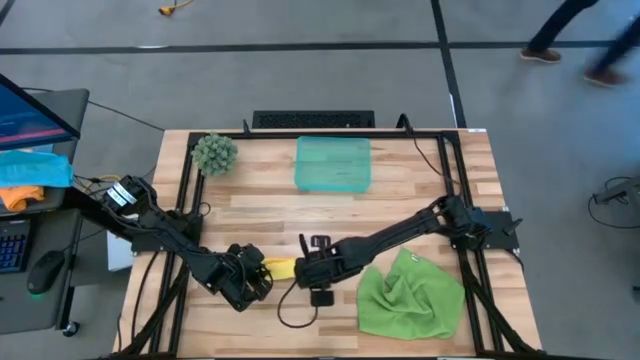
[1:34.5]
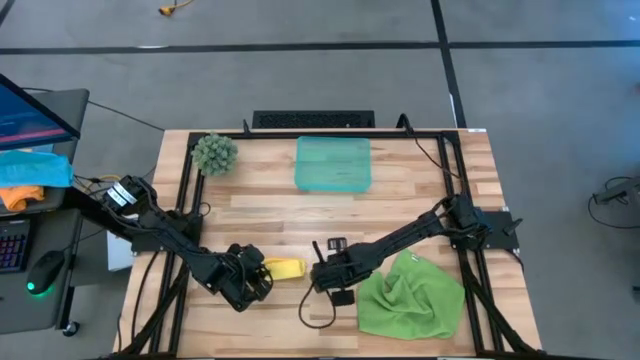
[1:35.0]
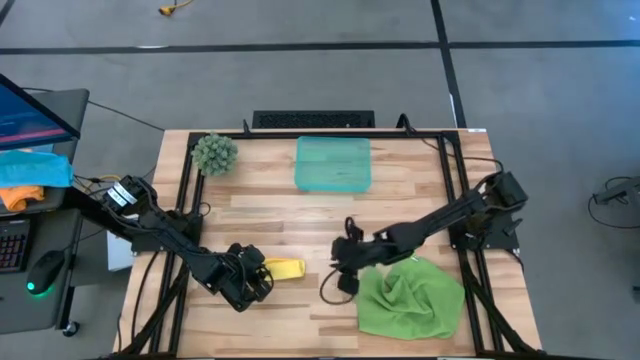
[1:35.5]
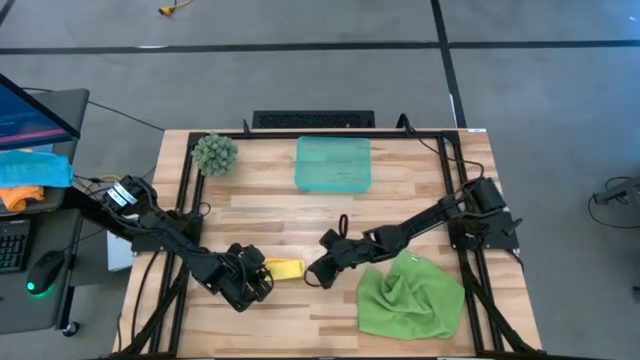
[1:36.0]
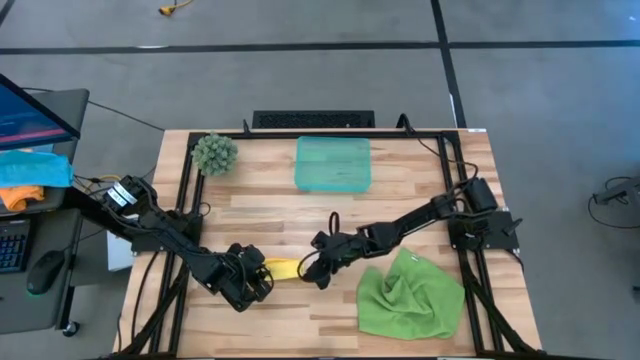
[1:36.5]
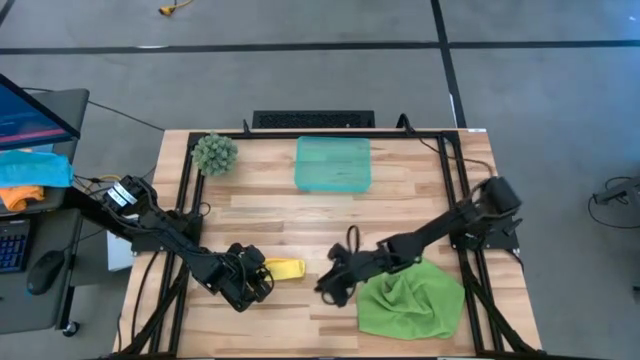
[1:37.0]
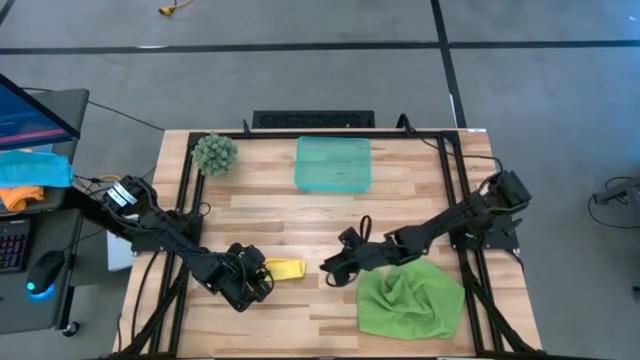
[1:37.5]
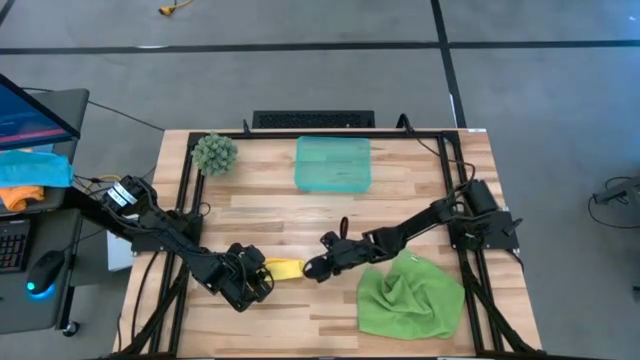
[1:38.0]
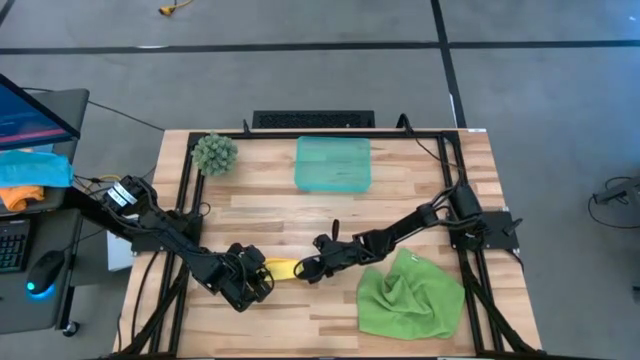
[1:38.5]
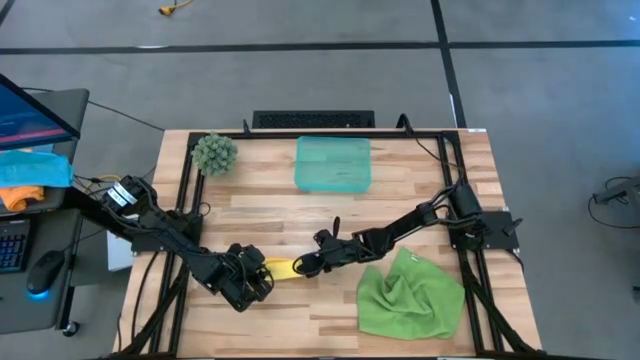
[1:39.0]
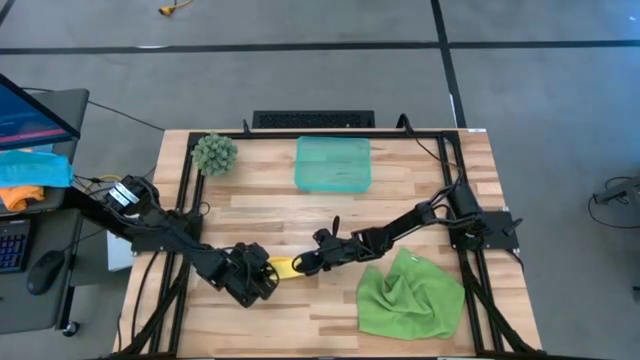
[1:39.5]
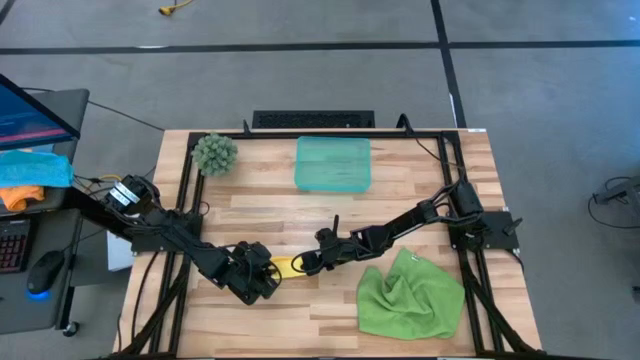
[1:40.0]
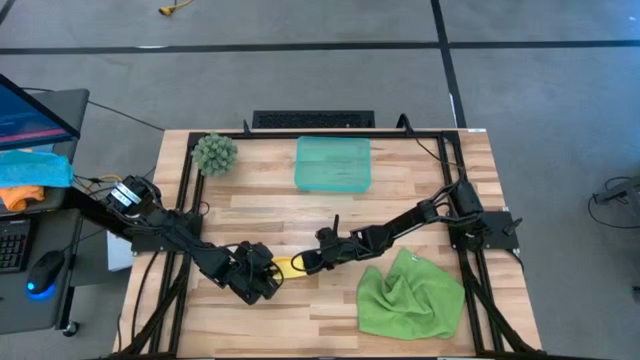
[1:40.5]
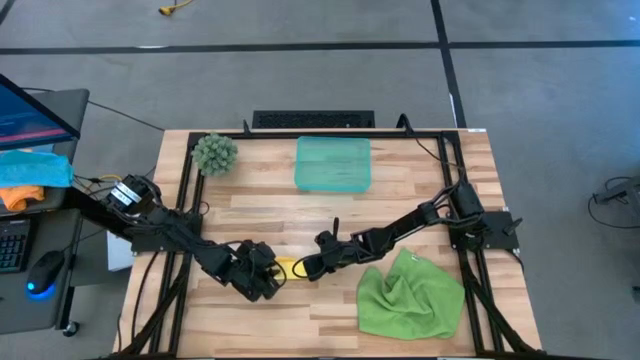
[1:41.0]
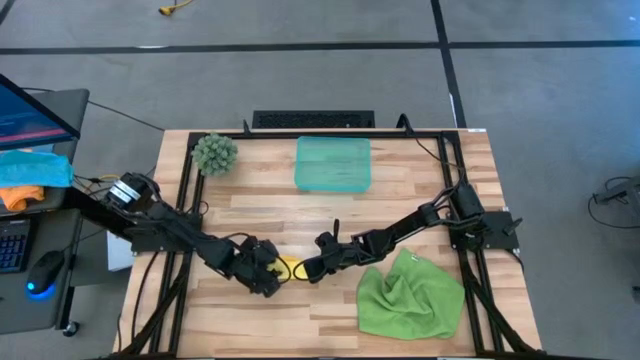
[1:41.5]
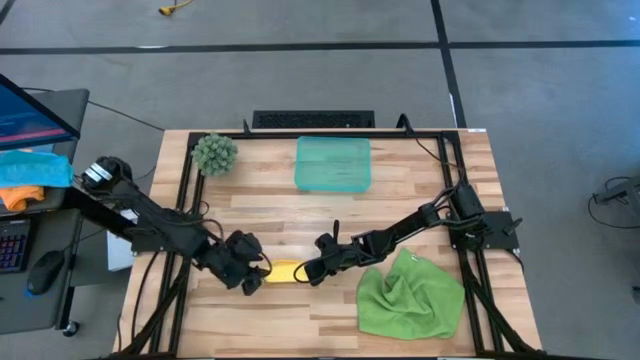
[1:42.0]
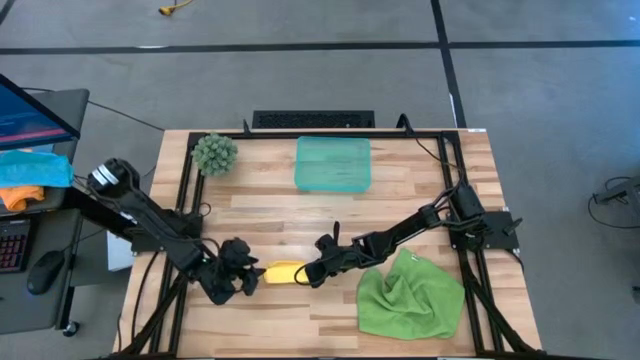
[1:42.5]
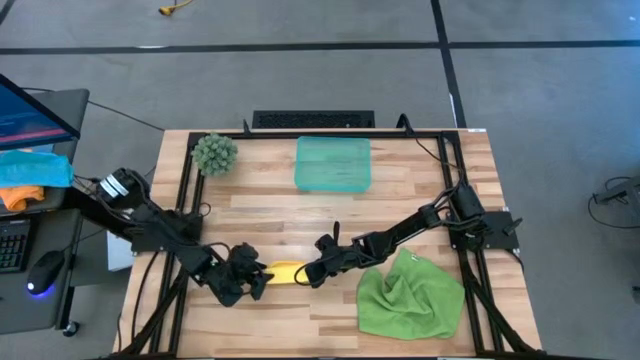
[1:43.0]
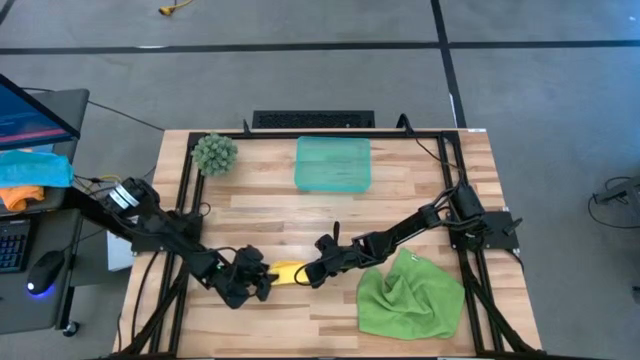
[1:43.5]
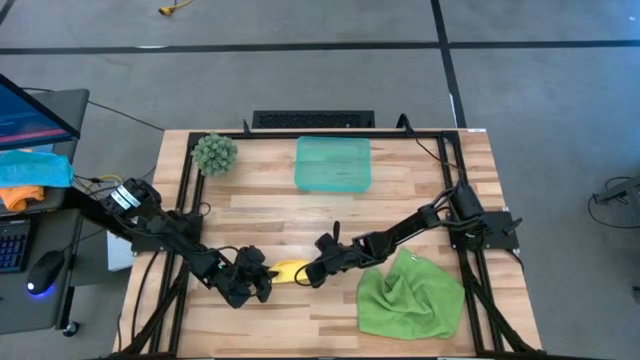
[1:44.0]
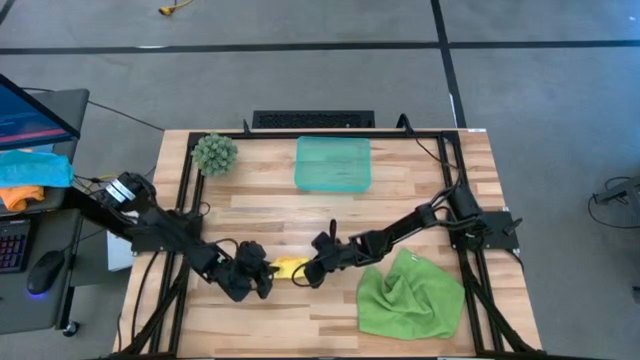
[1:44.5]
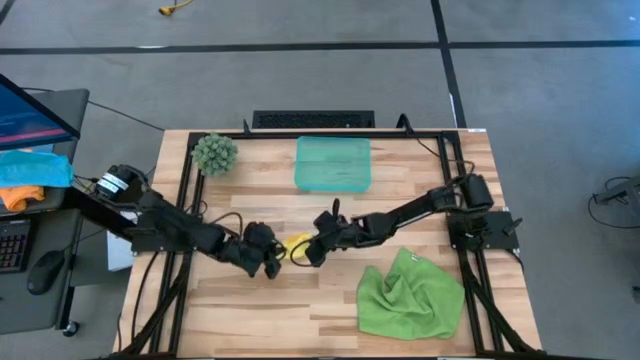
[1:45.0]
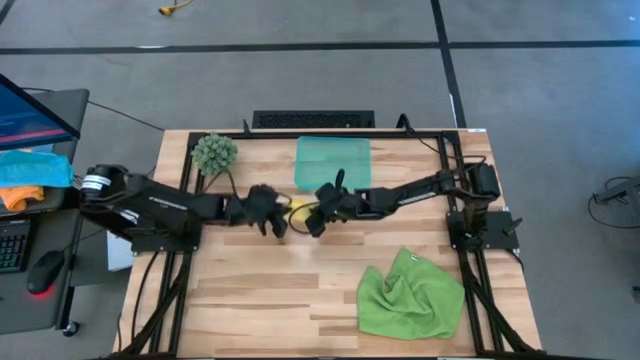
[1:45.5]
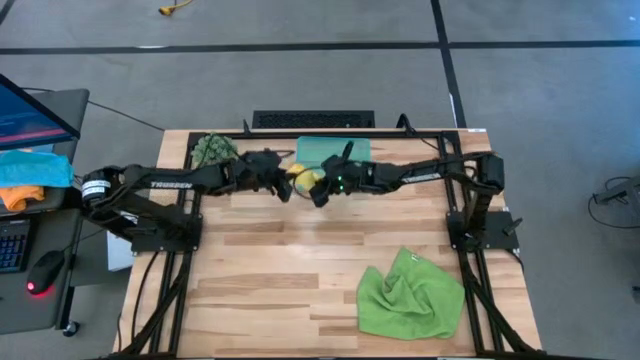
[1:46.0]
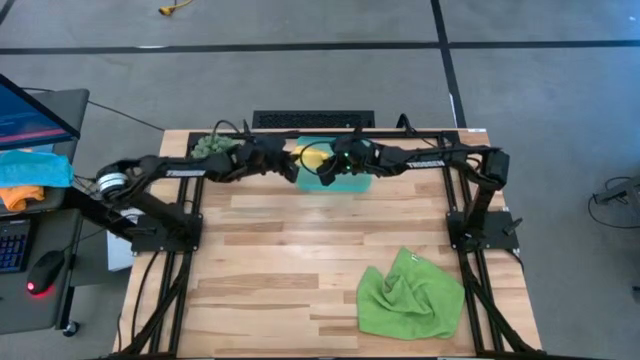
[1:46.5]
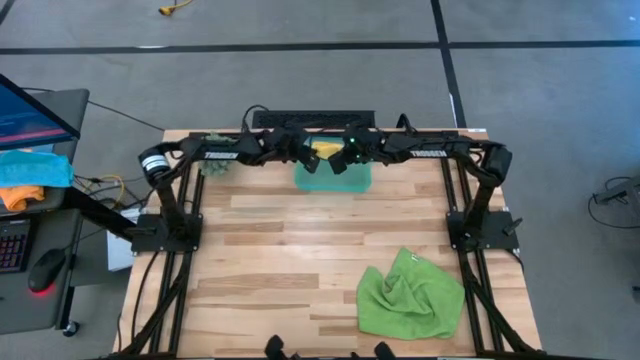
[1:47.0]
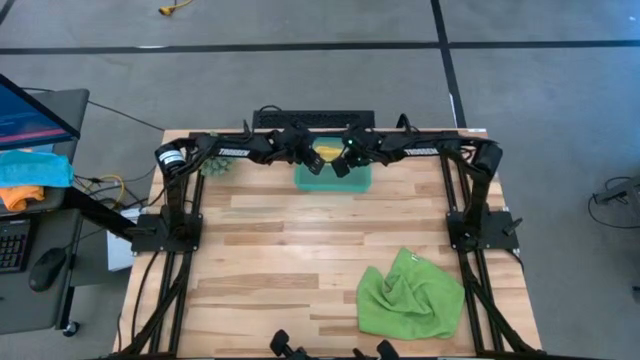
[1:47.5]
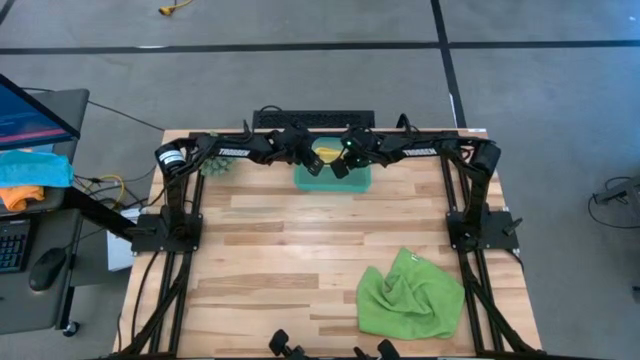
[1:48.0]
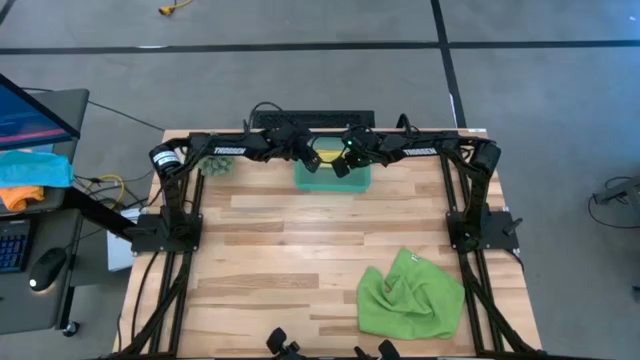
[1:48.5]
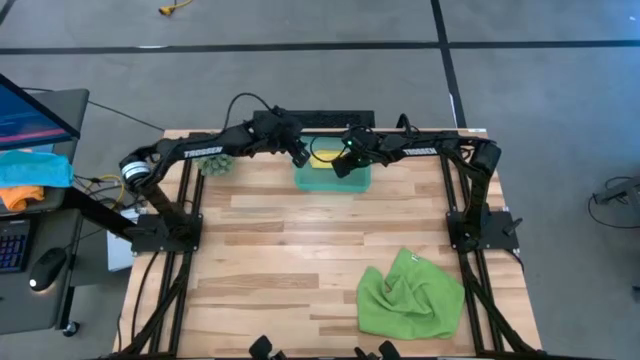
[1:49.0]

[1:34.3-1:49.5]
Task: Roll microfiber towels into tight, uniform cylinder then place into a basket
Put the yellow microfiber cloth into the green bin

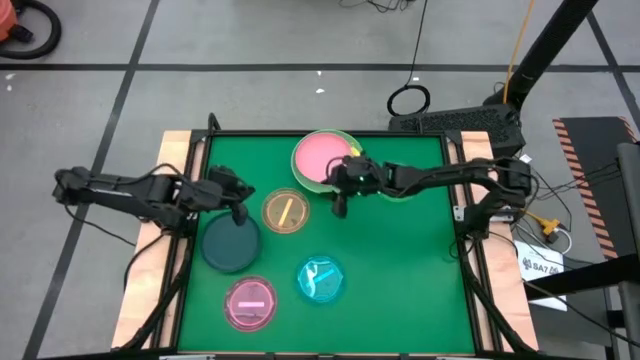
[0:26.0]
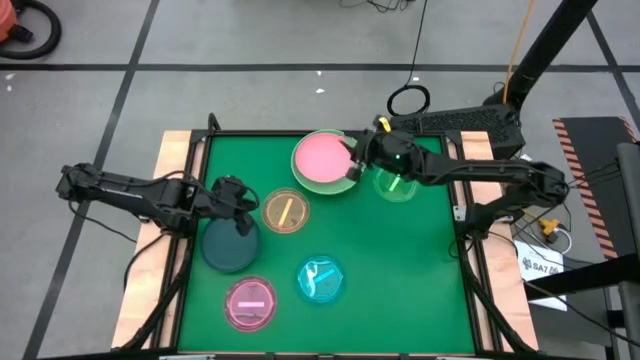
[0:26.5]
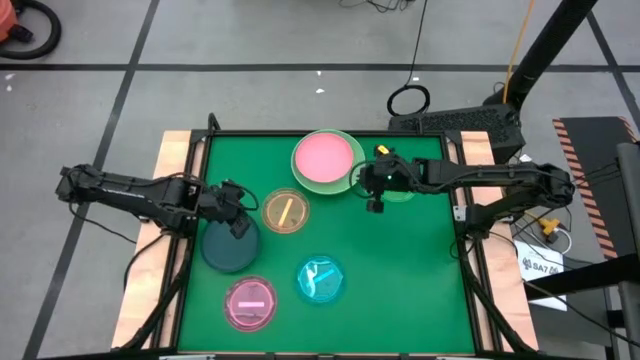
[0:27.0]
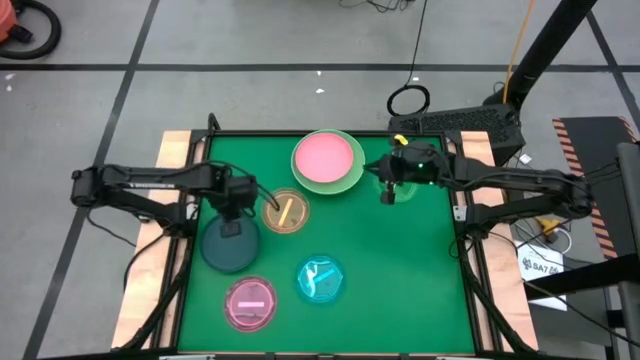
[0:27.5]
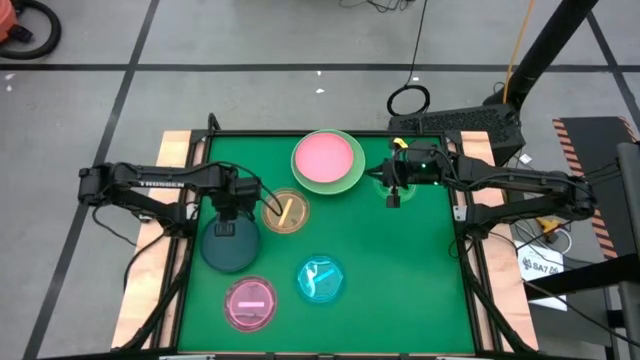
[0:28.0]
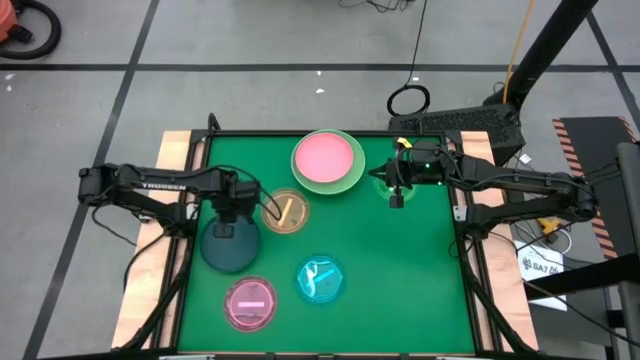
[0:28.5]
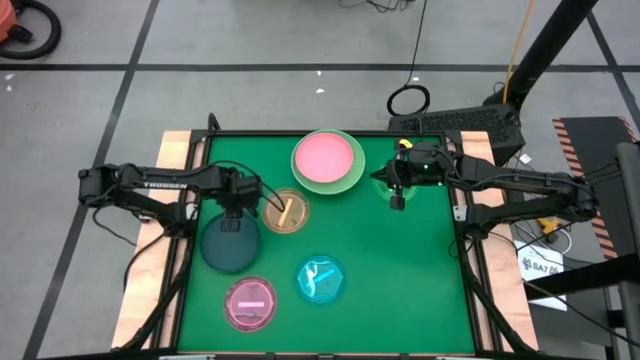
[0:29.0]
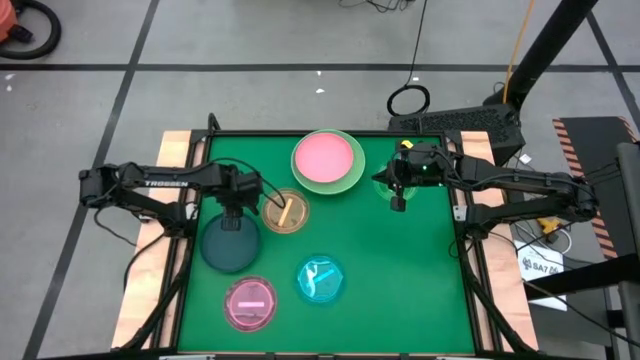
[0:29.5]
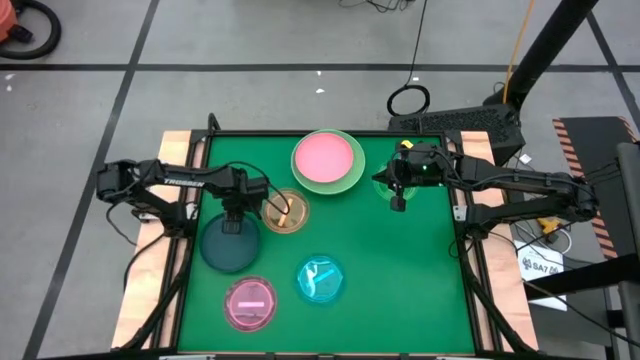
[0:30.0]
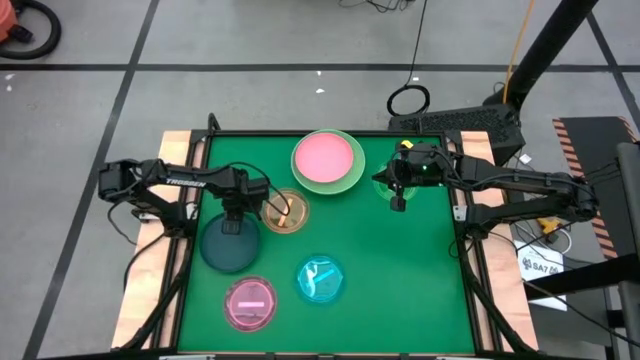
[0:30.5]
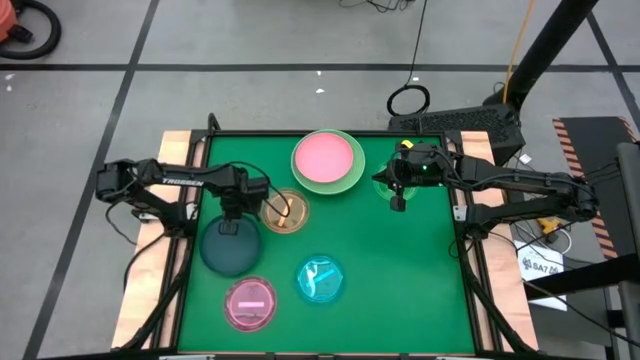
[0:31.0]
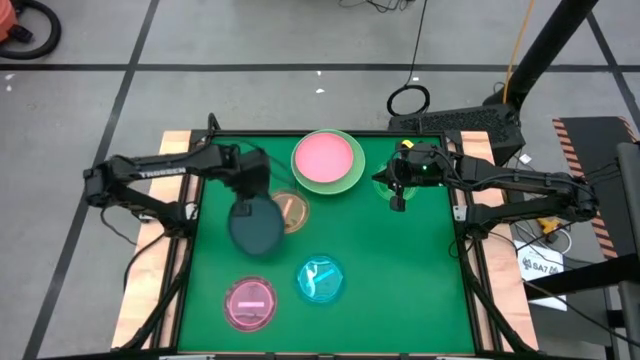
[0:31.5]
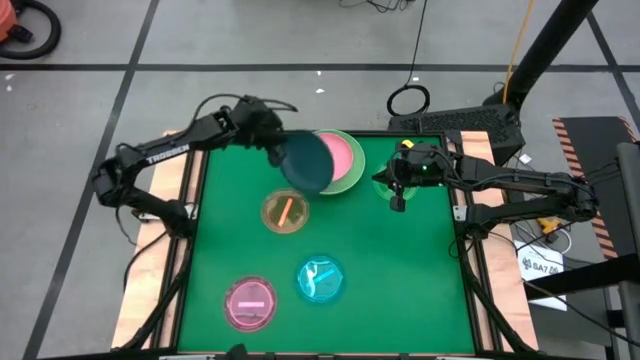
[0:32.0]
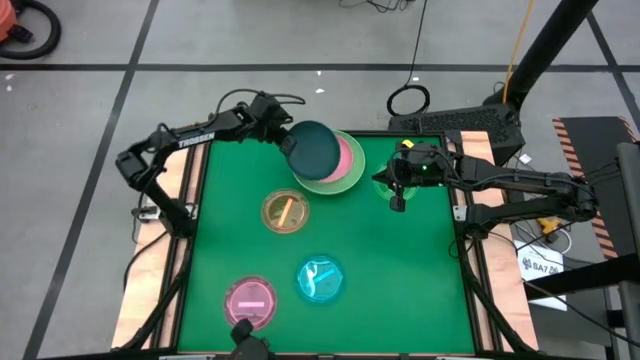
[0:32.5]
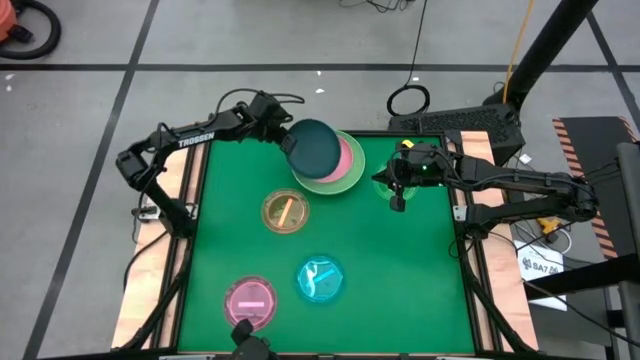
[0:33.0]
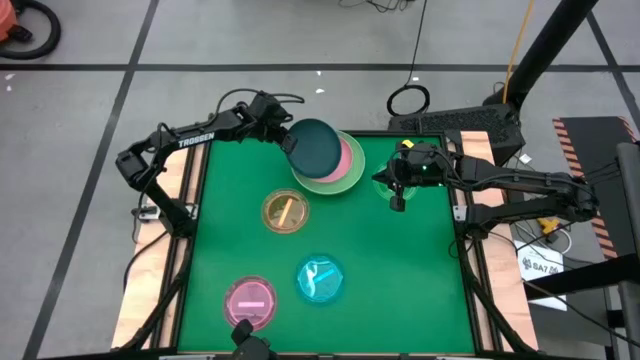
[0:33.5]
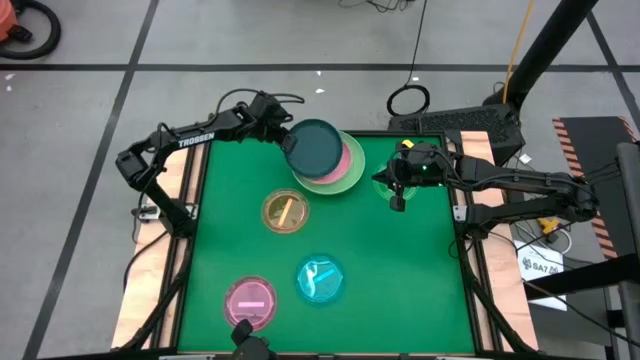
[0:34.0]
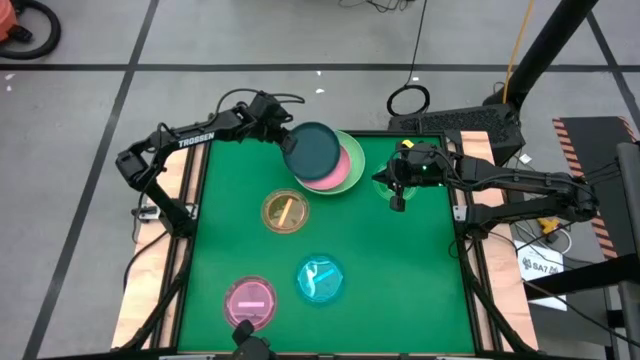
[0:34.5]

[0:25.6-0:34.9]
Task: Stack plastic plates
Stack the dark blue plate on top of the pink plate
